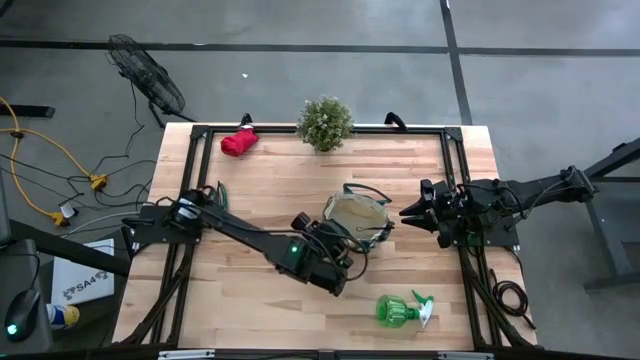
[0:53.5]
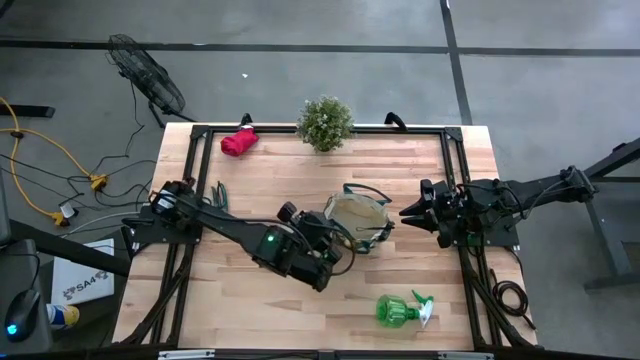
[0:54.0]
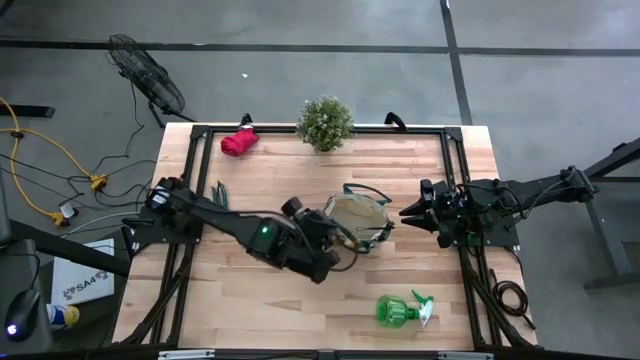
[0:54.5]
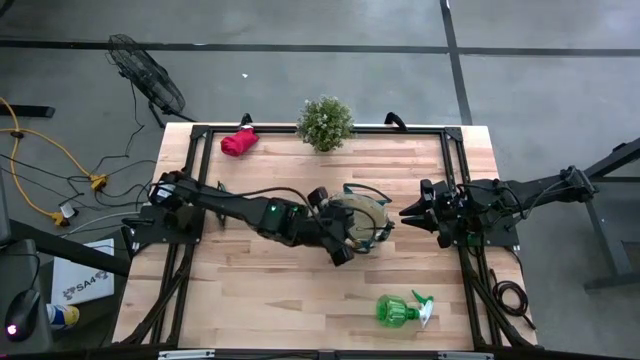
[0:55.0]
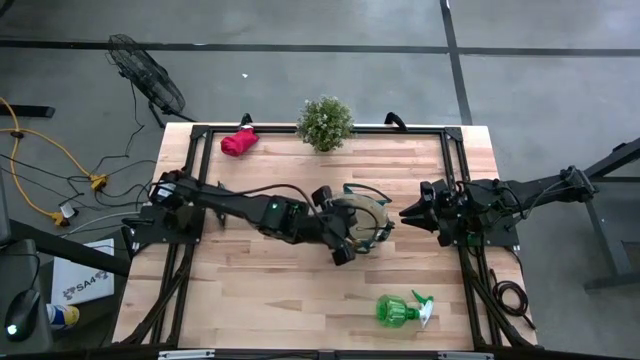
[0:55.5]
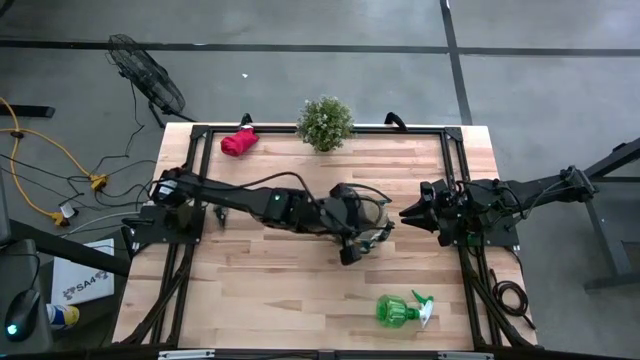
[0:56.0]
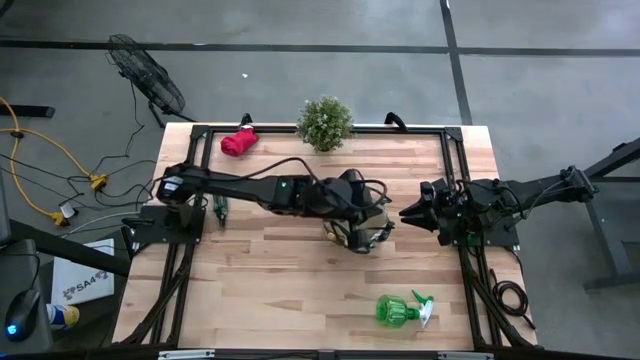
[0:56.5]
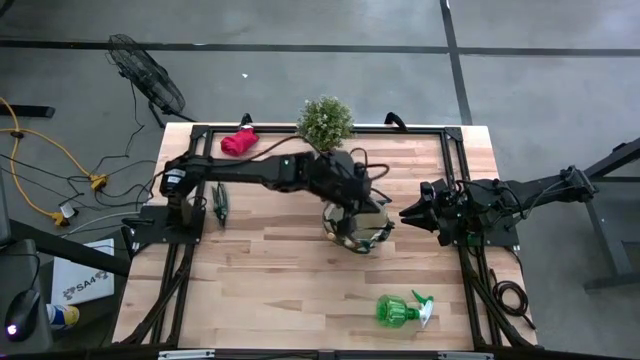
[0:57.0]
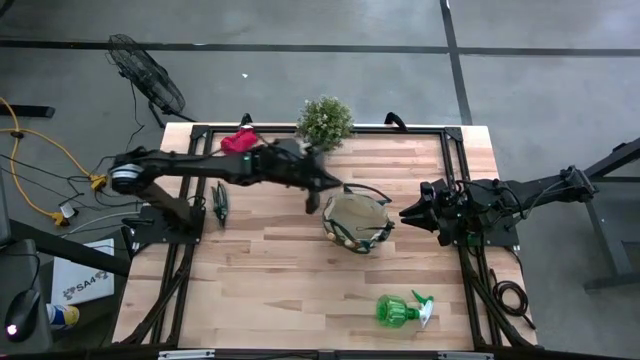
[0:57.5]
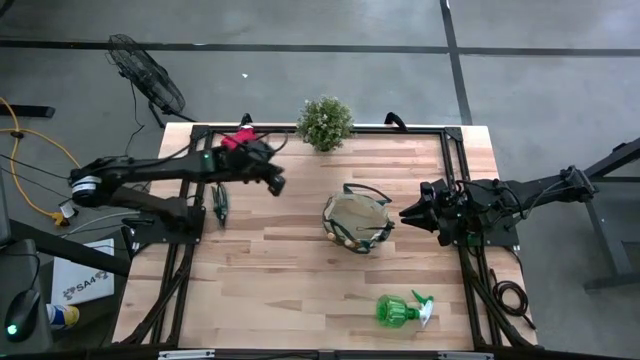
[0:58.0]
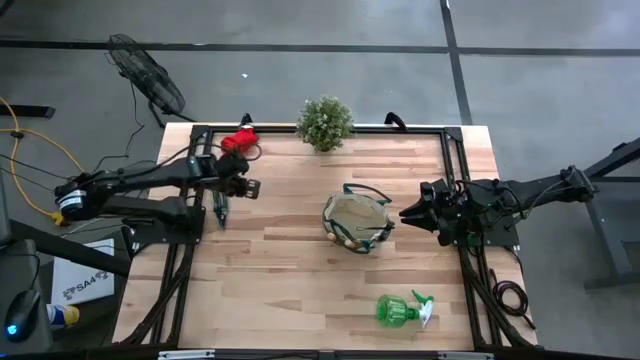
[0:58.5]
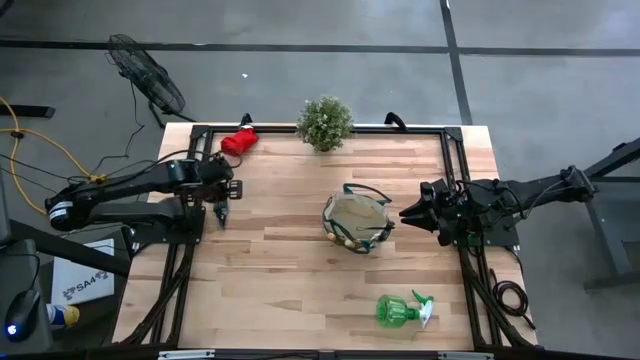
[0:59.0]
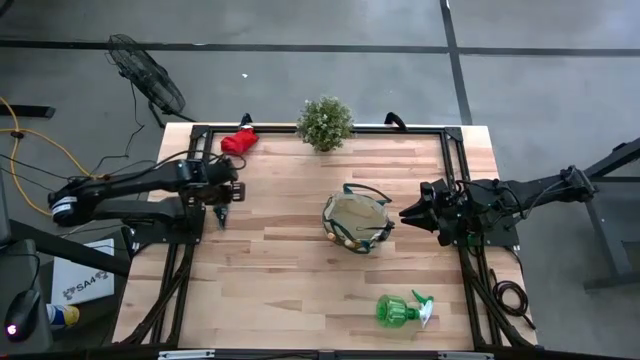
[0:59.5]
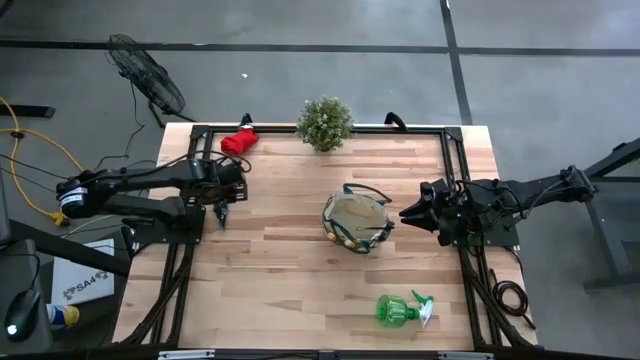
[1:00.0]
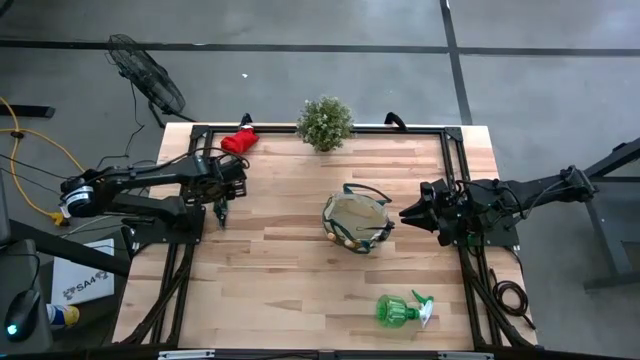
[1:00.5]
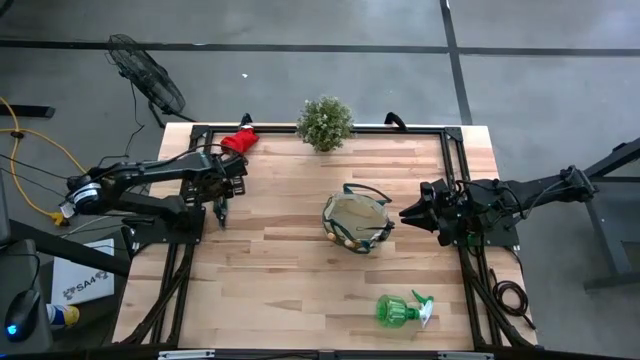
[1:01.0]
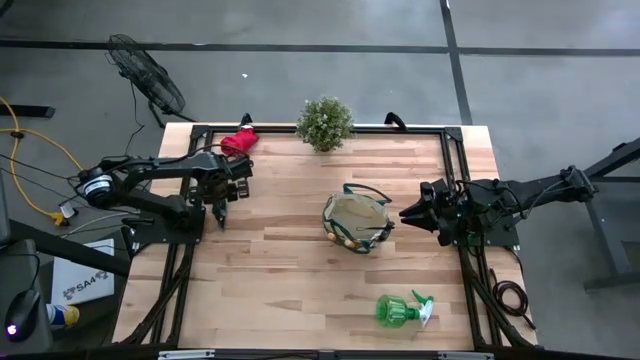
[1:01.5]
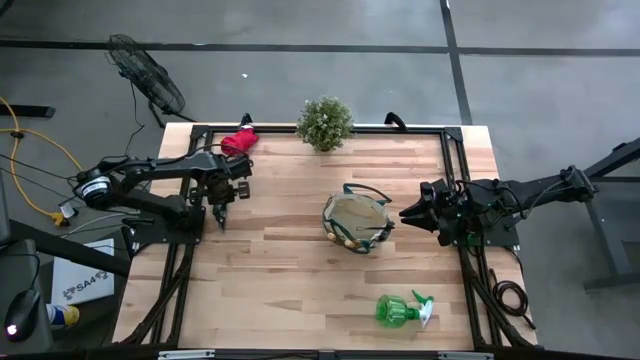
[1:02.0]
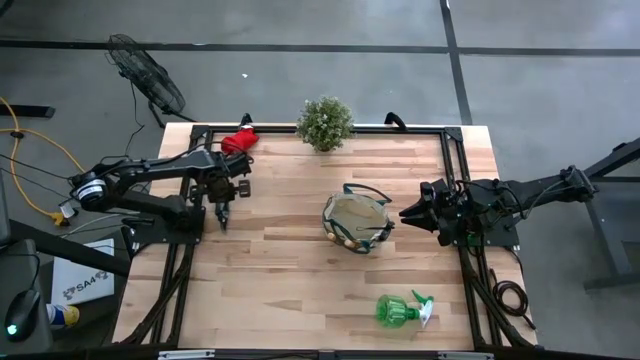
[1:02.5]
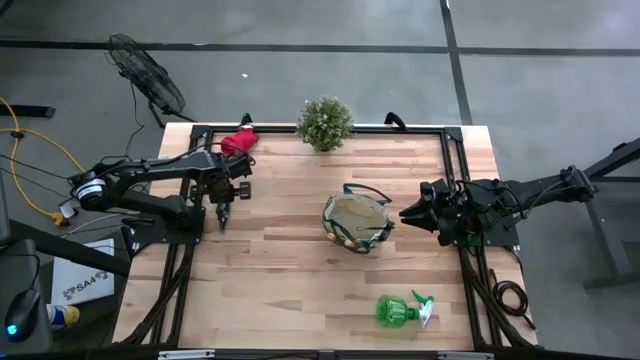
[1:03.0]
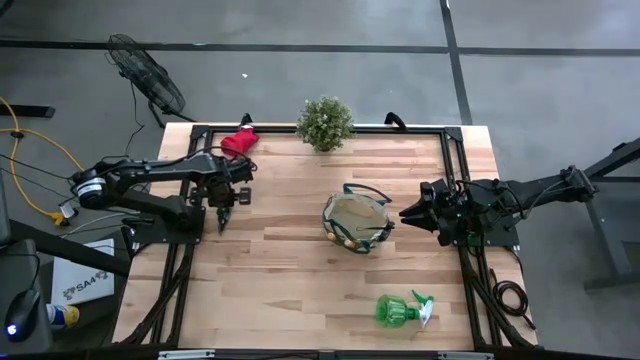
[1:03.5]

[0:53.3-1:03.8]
Task: Pick & Place Garden tools in Gardening bag
Put the green shear scissors into the brown gardening bag

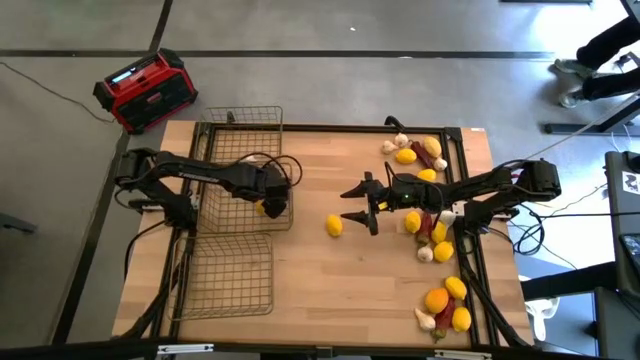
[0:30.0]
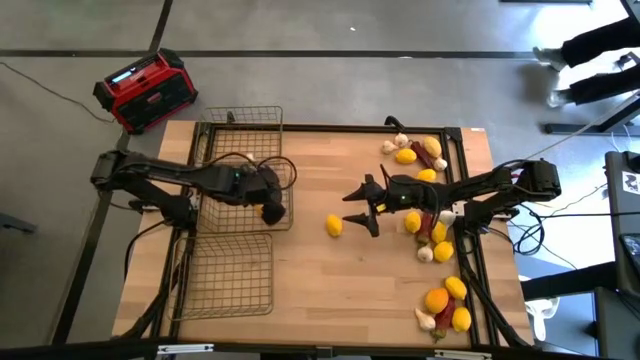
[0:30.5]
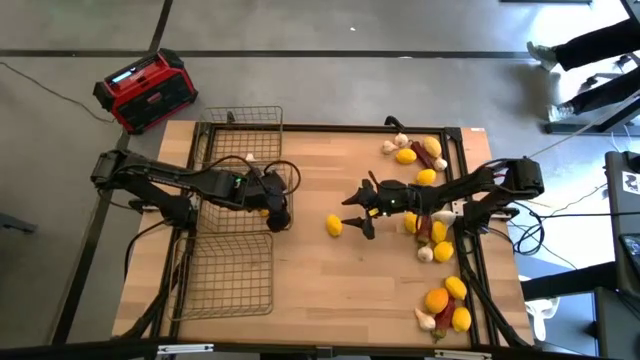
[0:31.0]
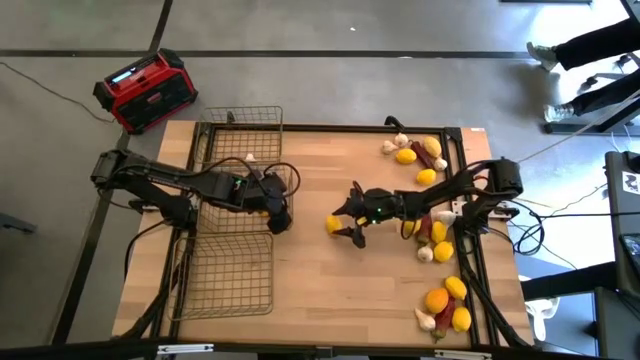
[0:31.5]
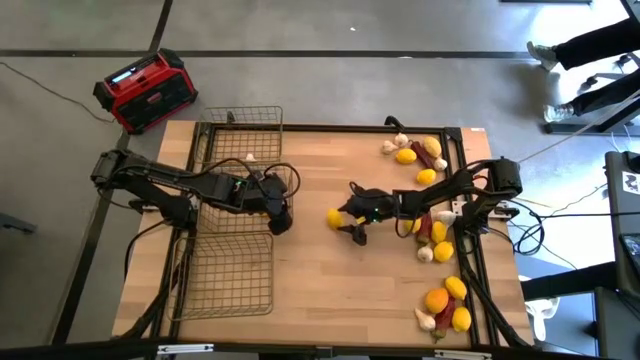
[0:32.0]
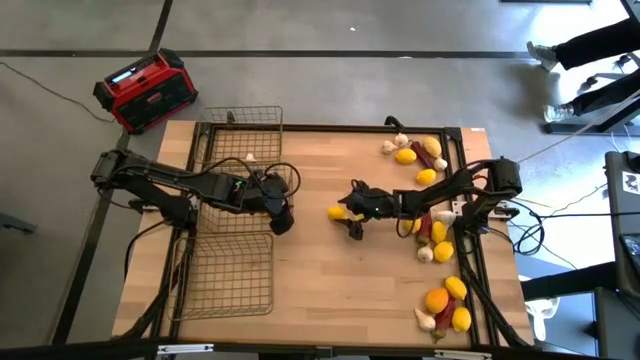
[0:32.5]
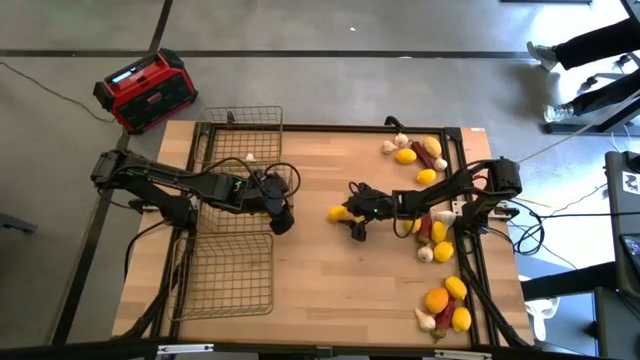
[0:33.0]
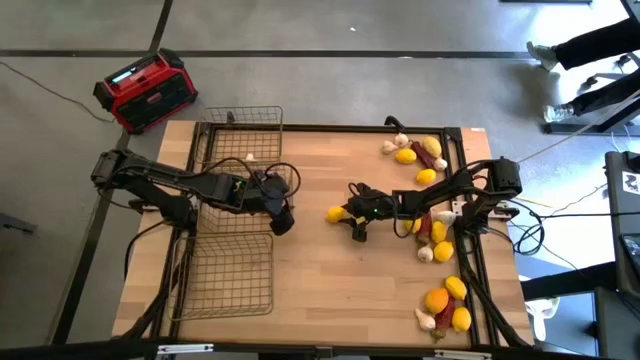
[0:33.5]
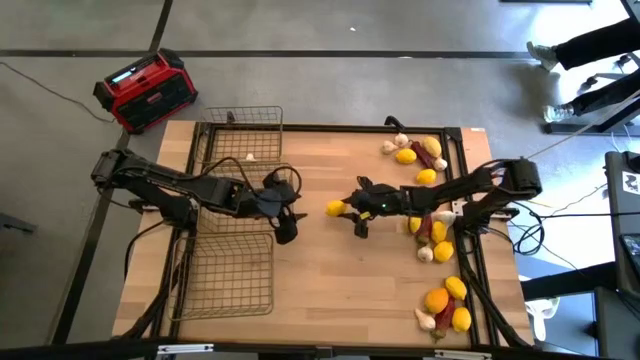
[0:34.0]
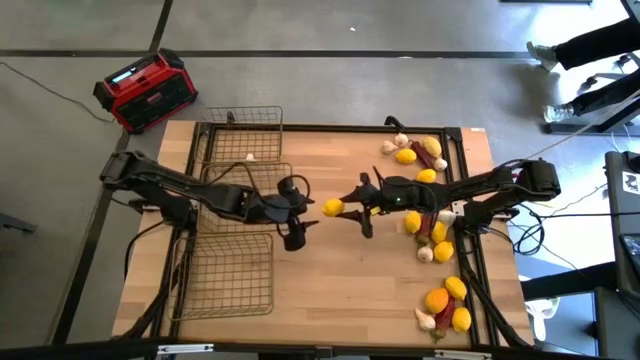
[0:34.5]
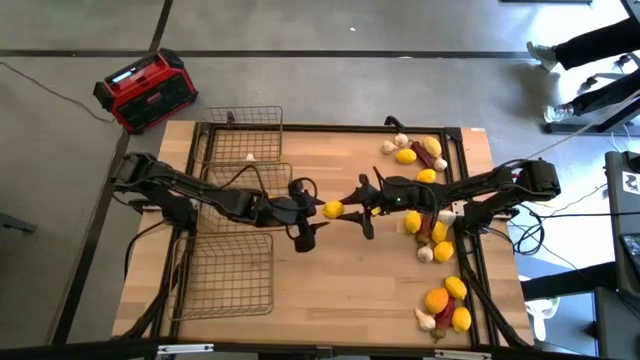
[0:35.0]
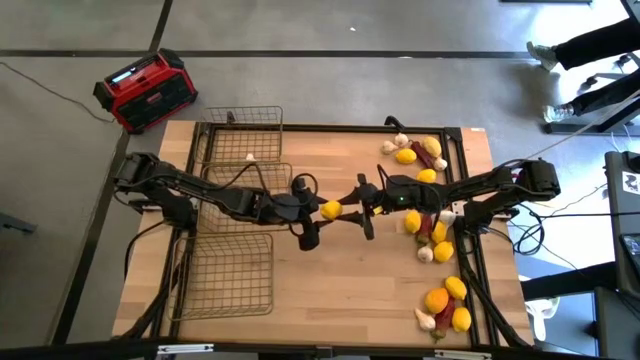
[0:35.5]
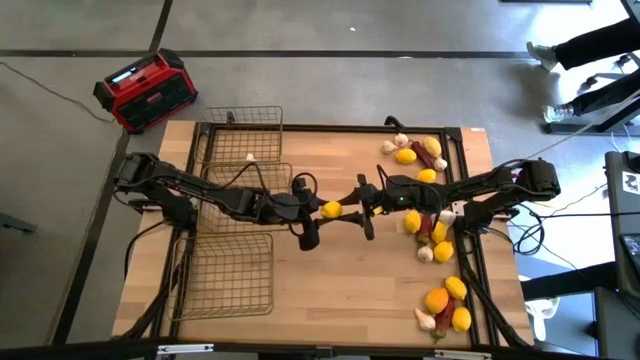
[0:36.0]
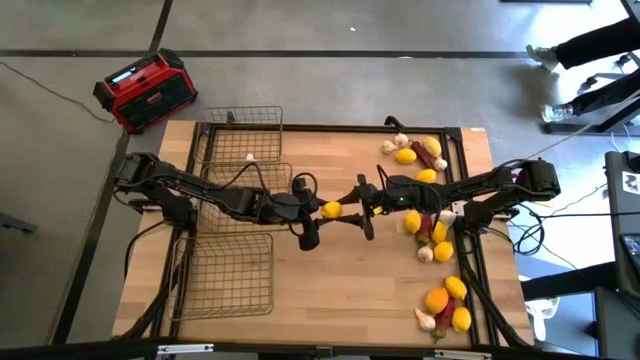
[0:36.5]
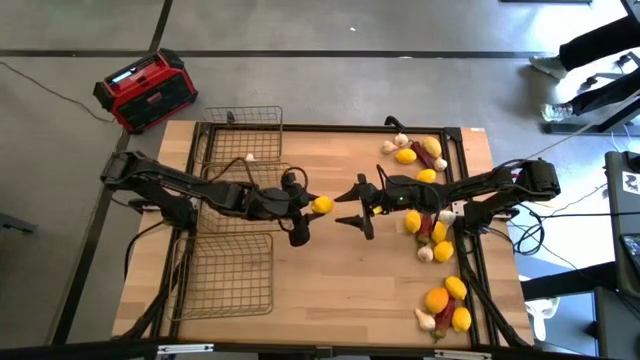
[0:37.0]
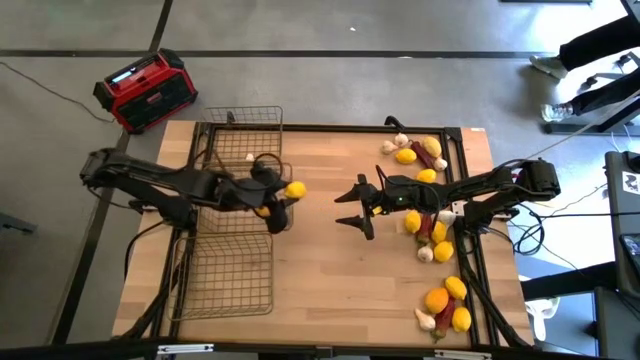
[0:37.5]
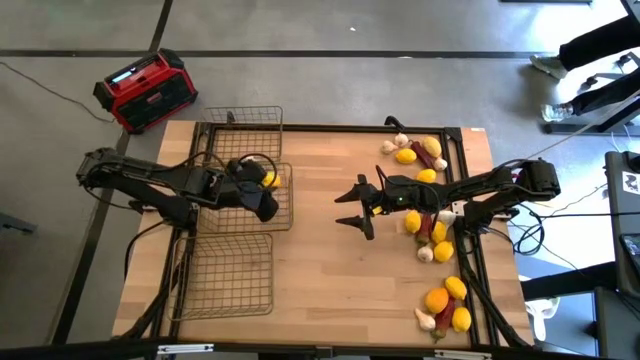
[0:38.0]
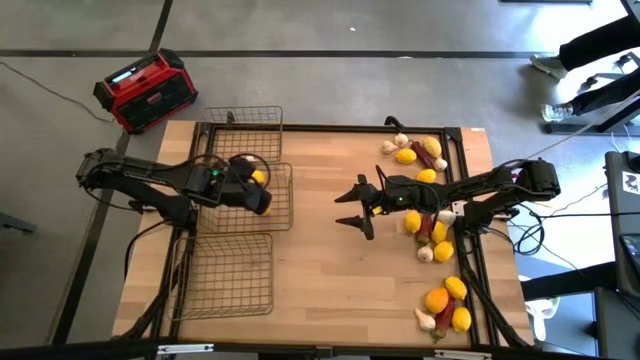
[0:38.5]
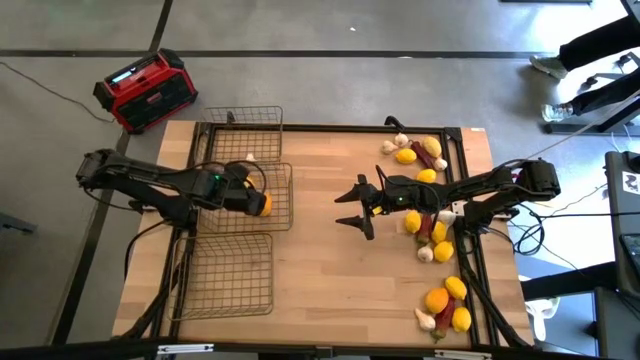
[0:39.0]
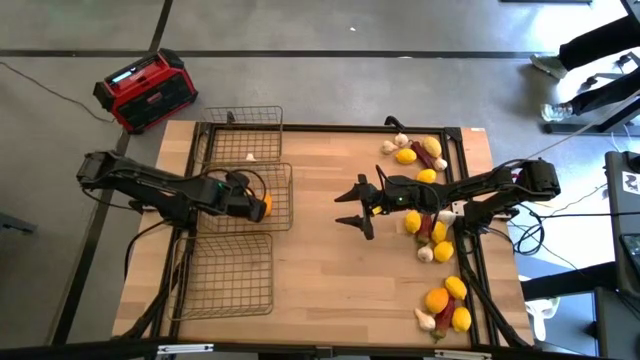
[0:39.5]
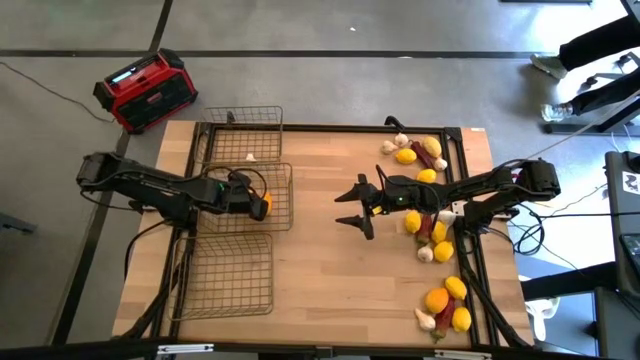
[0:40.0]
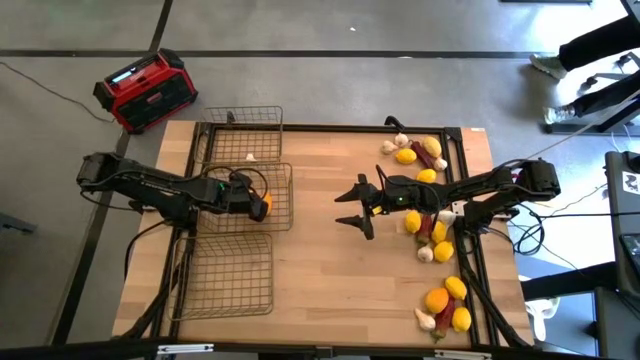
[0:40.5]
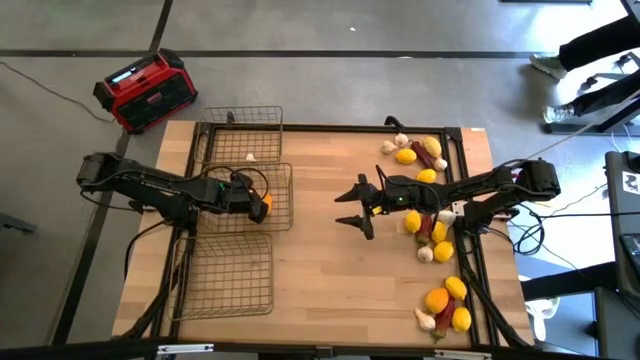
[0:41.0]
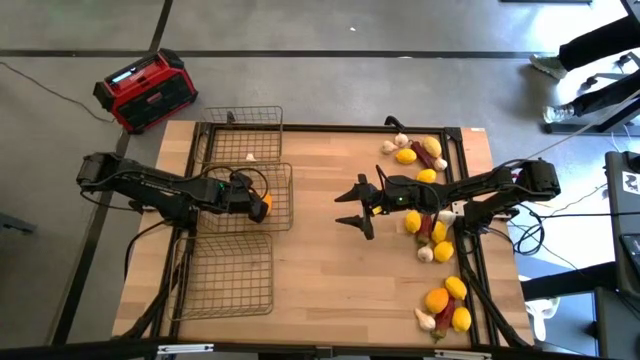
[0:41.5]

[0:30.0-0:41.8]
Task: Sort produce into baskets
Put the lemon in the middle wire basket
